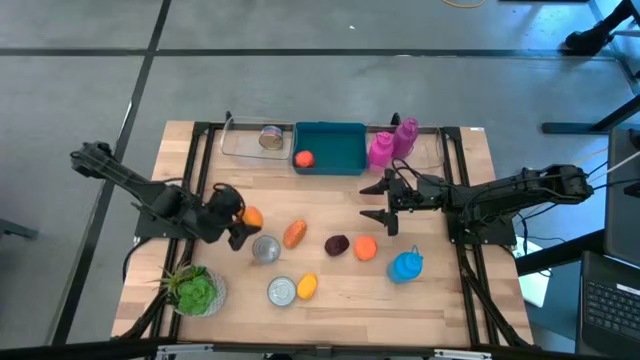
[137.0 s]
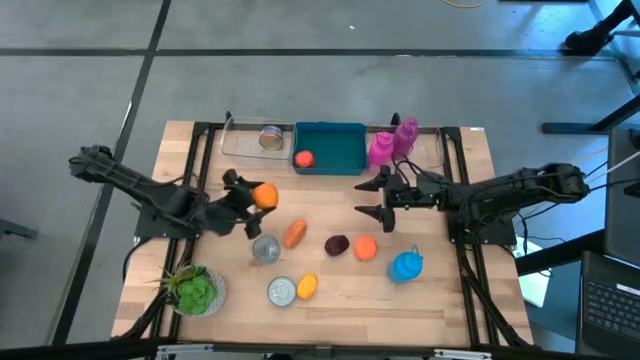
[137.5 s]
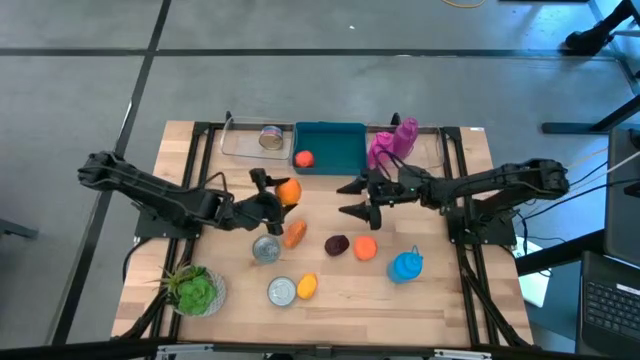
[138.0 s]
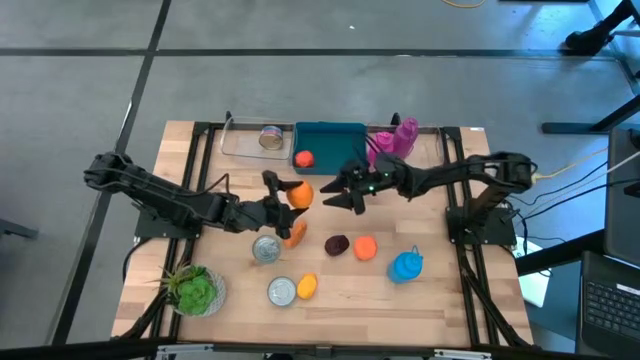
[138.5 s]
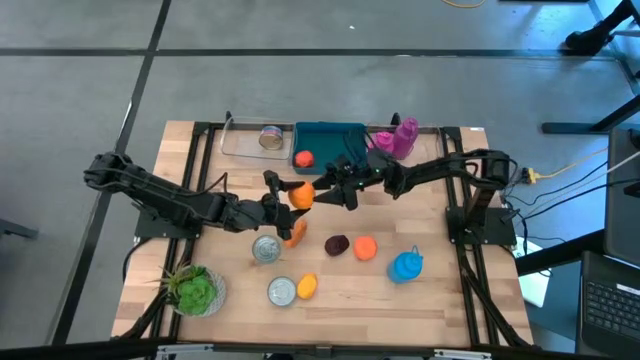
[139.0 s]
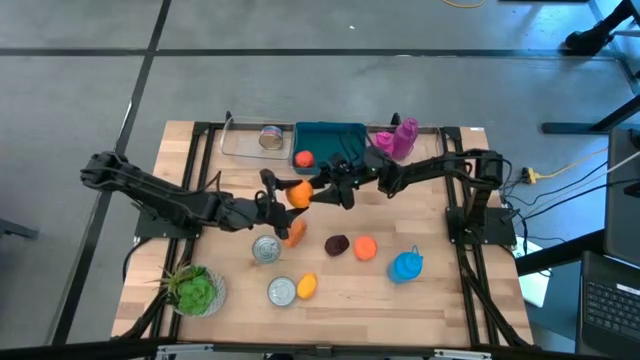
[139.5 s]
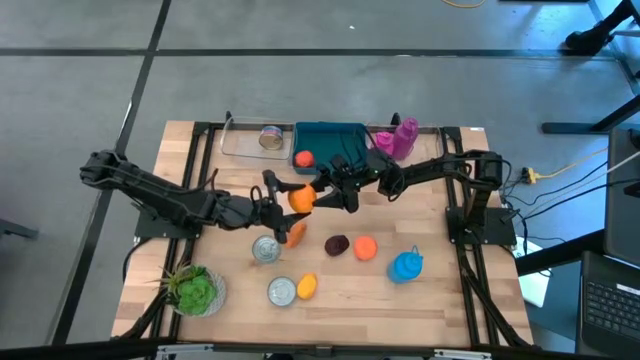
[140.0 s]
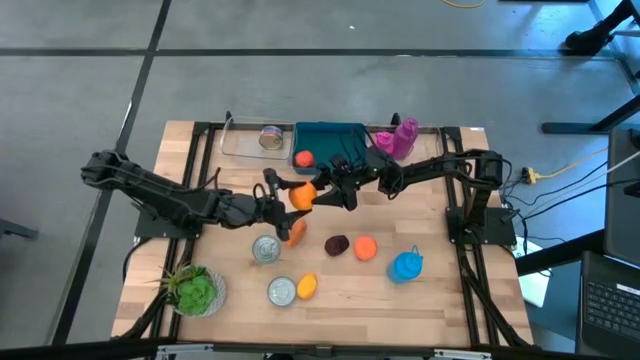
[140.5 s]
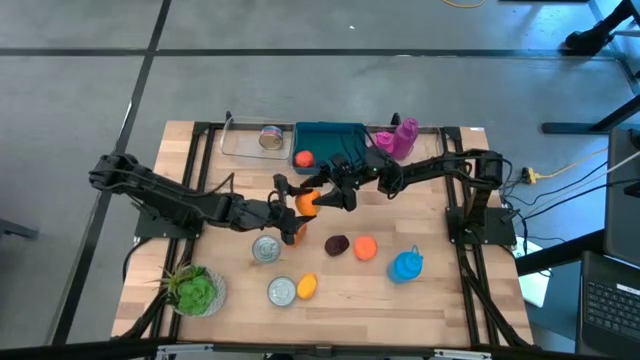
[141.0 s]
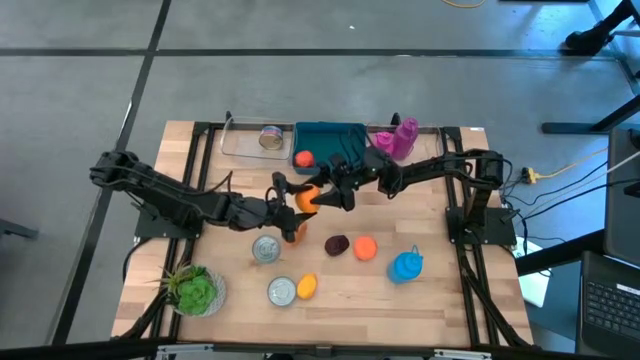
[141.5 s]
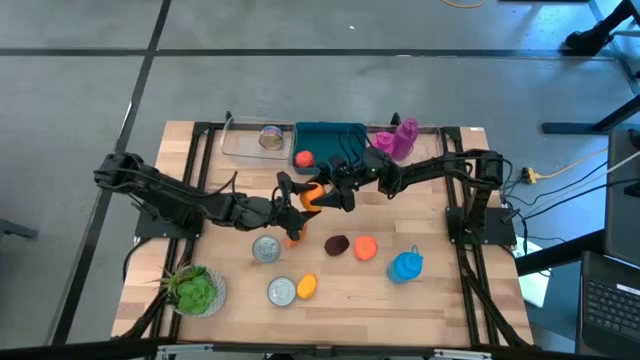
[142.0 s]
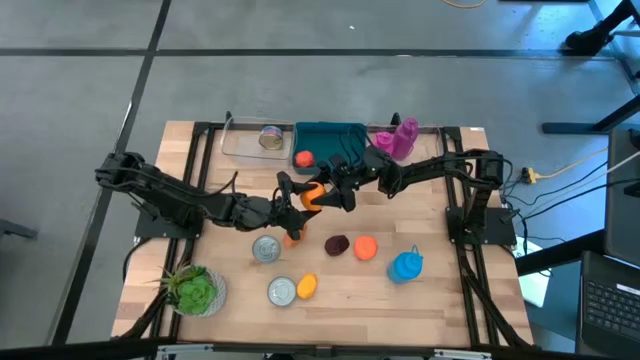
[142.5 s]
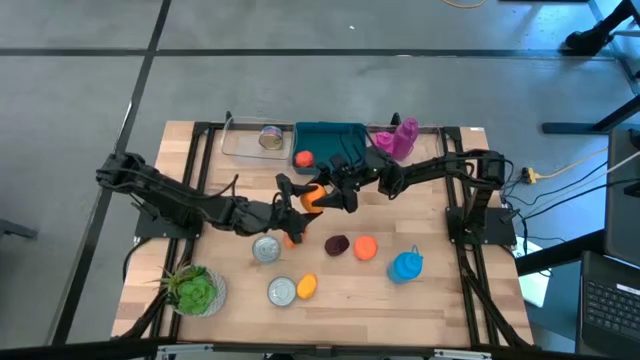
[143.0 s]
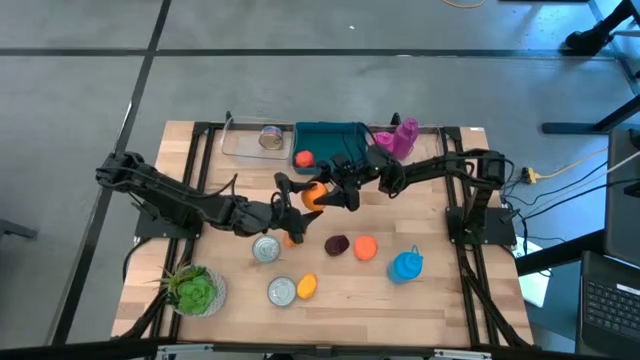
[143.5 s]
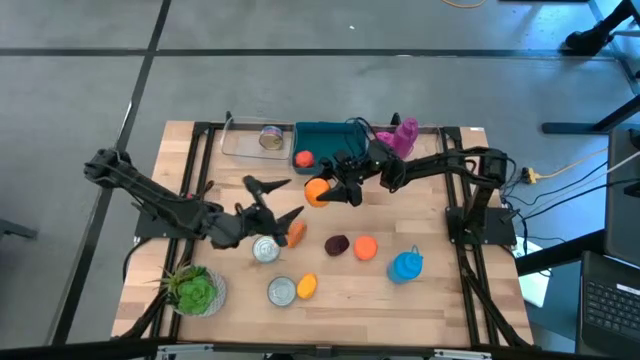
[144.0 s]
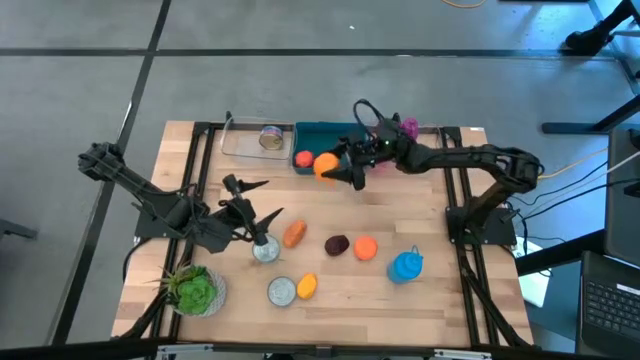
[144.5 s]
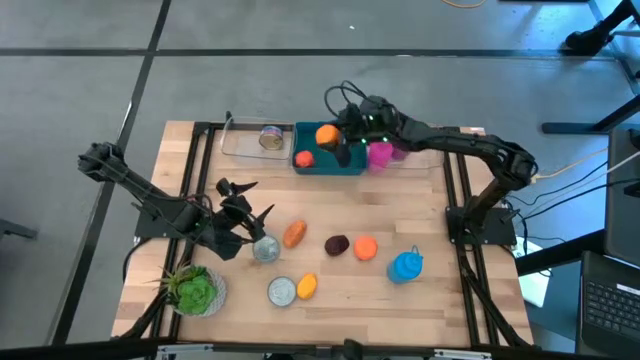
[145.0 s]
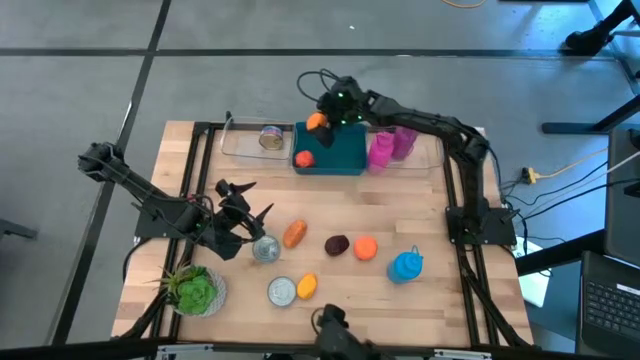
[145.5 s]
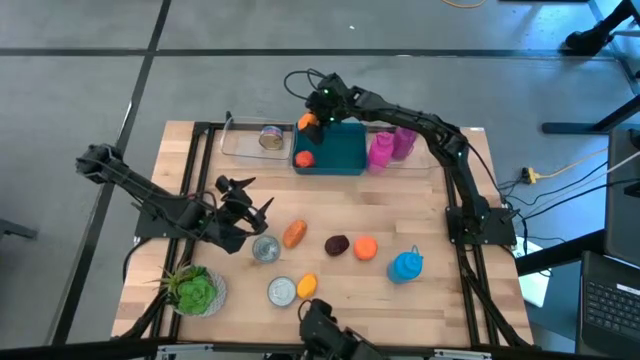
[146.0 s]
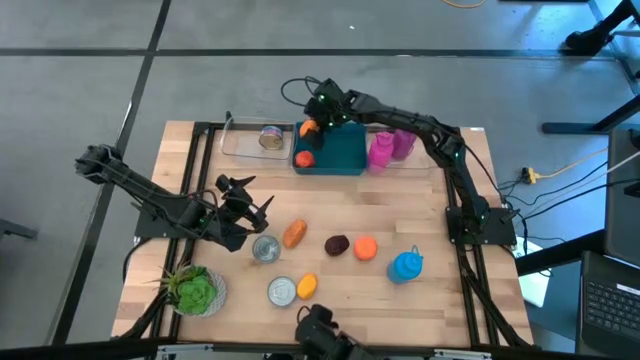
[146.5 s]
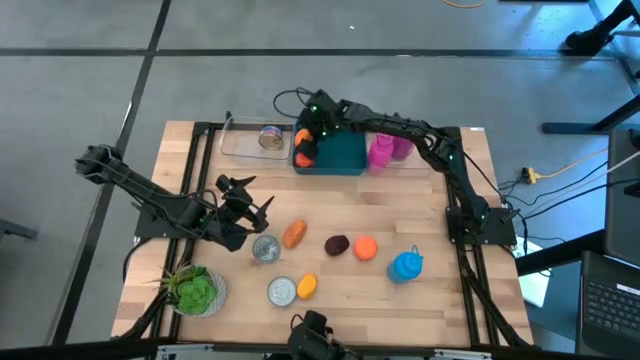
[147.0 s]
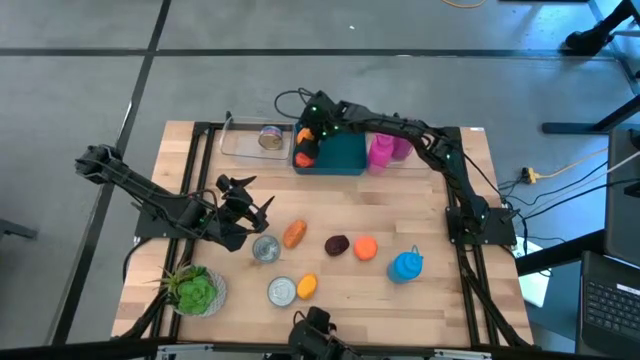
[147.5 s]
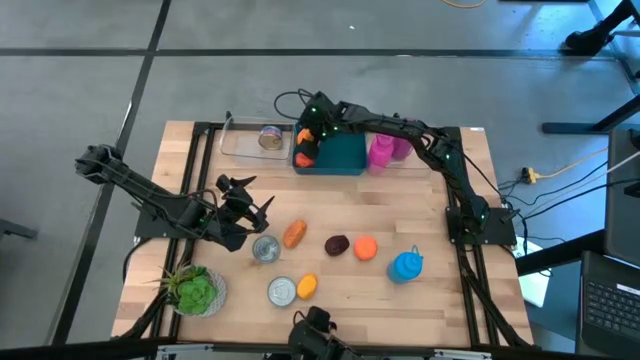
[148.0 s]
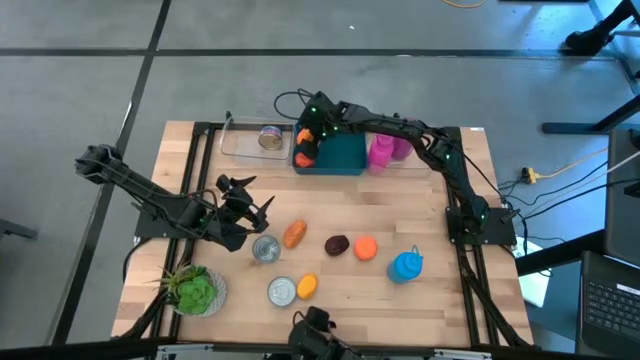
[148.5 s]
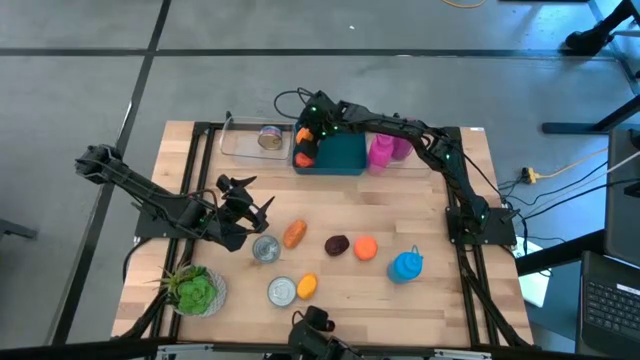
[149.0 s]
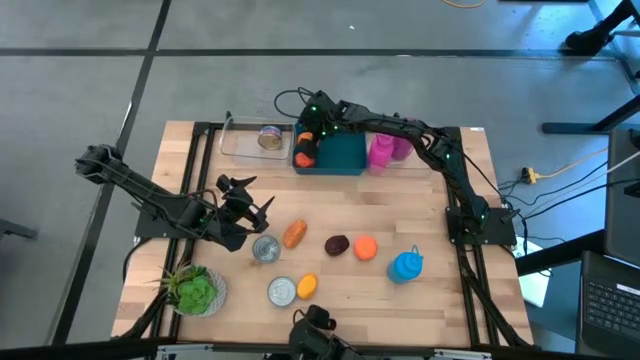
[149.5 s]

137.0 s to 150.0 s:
Task: Pick & Place Food Item
Put the left orange into the blue bin

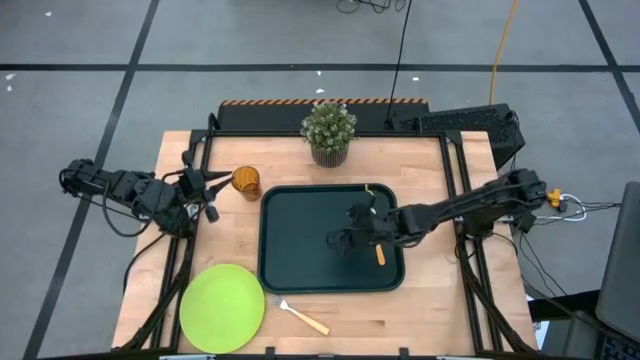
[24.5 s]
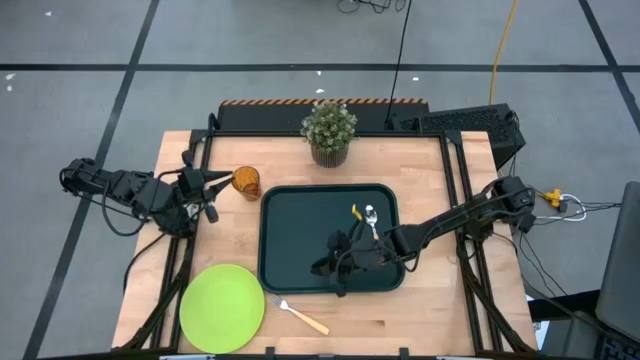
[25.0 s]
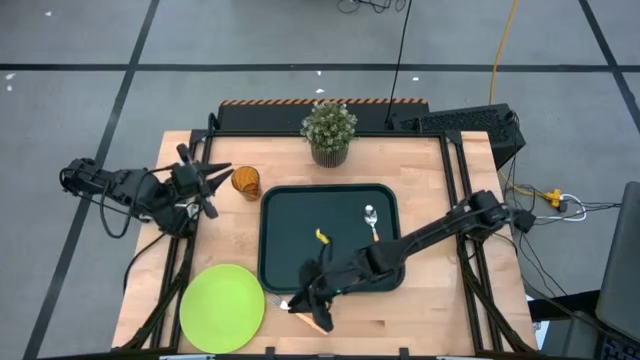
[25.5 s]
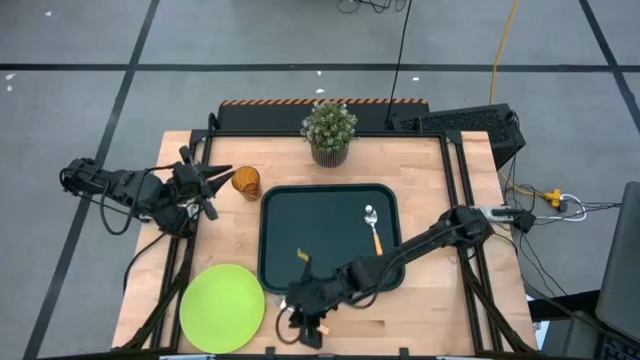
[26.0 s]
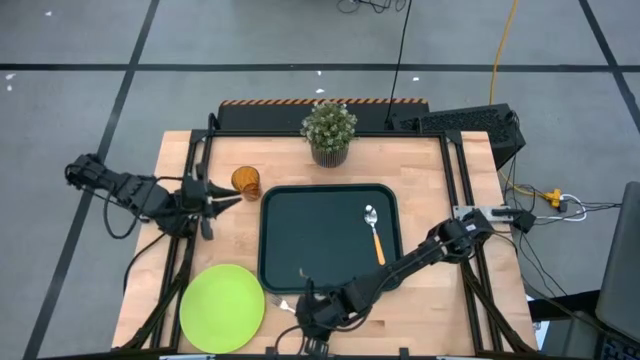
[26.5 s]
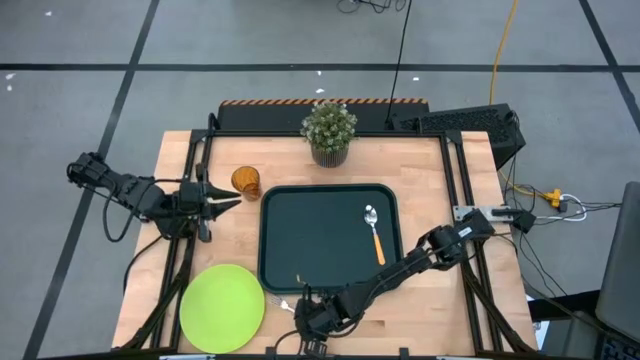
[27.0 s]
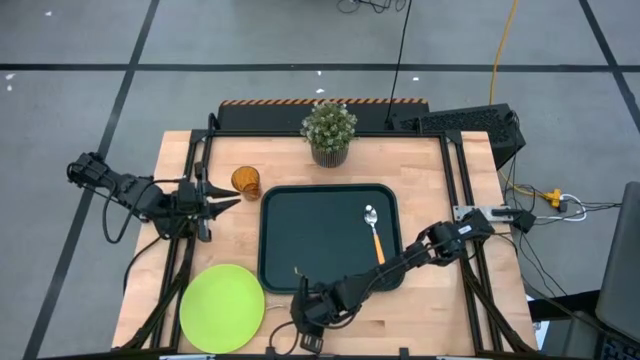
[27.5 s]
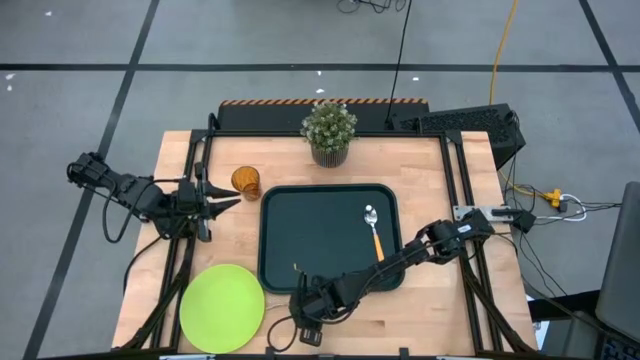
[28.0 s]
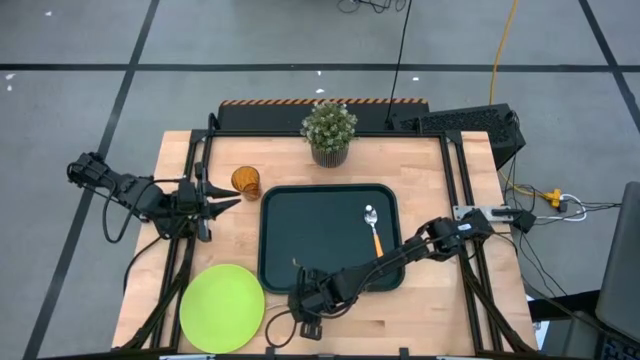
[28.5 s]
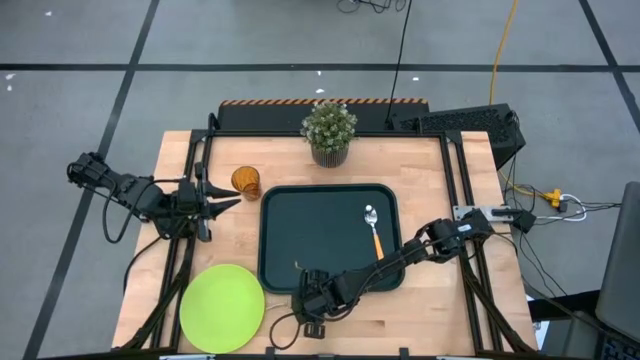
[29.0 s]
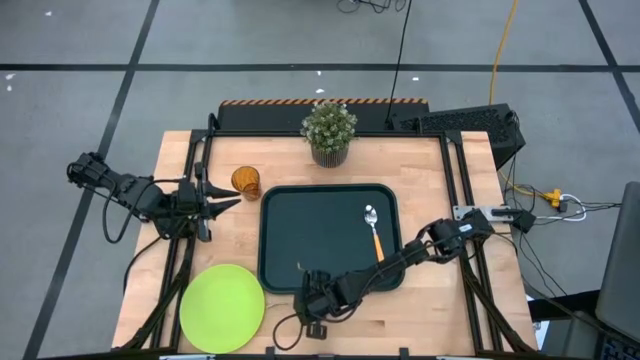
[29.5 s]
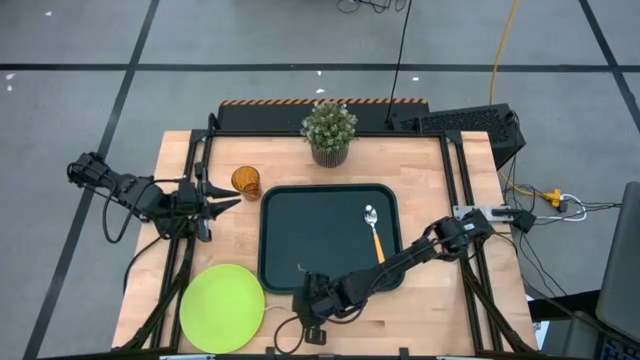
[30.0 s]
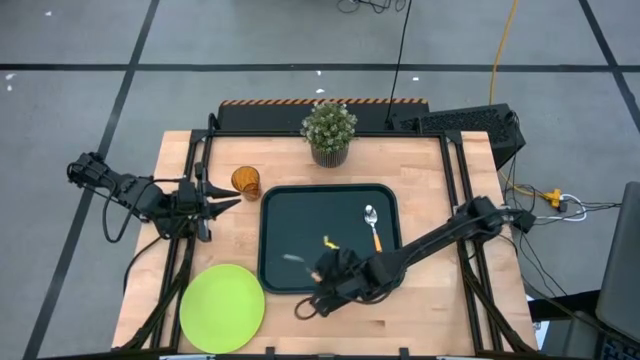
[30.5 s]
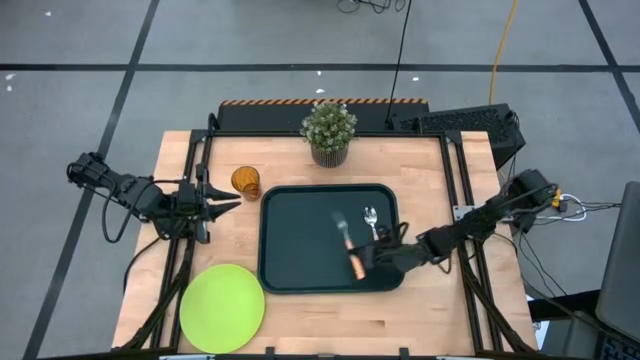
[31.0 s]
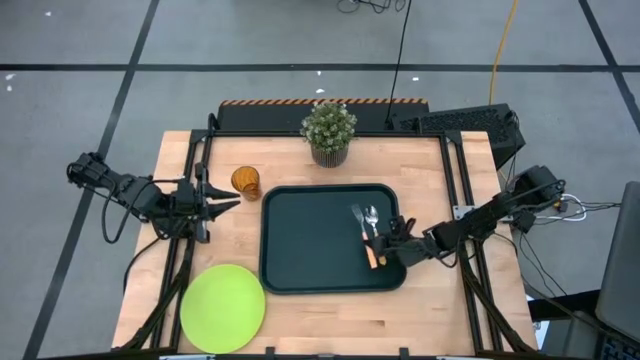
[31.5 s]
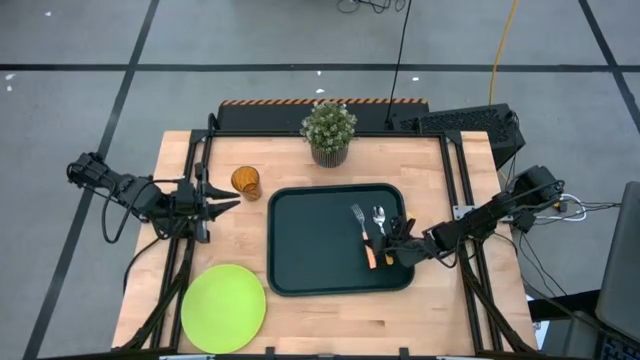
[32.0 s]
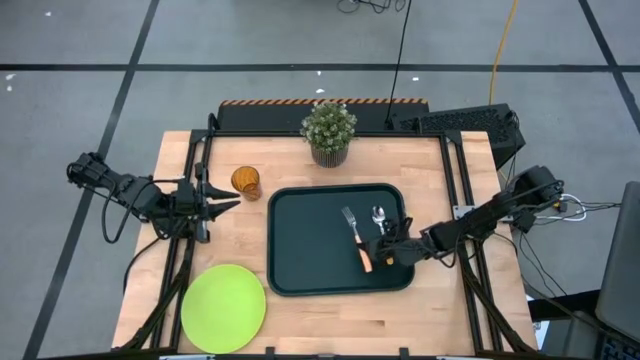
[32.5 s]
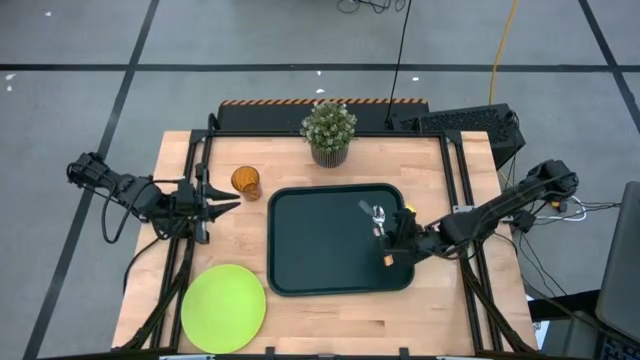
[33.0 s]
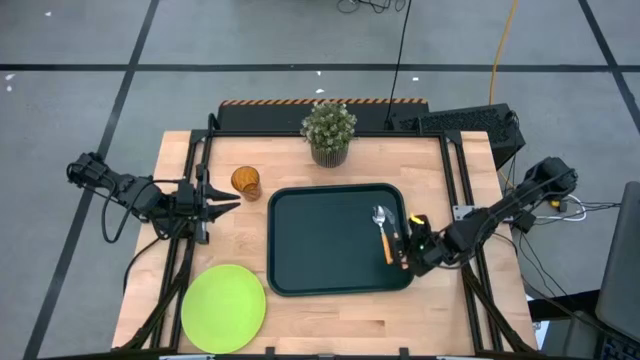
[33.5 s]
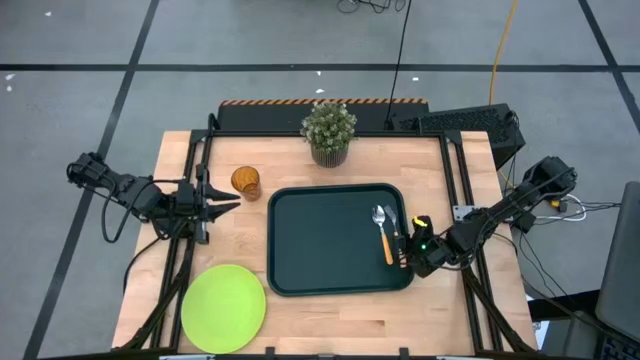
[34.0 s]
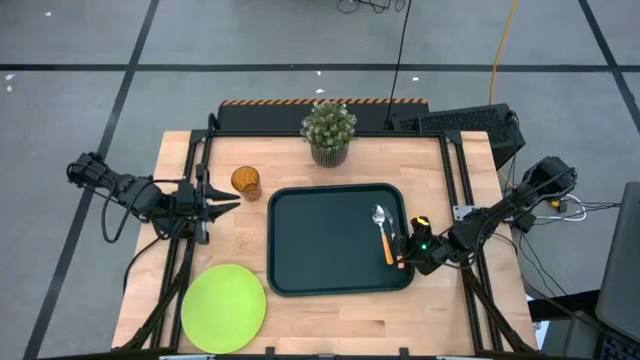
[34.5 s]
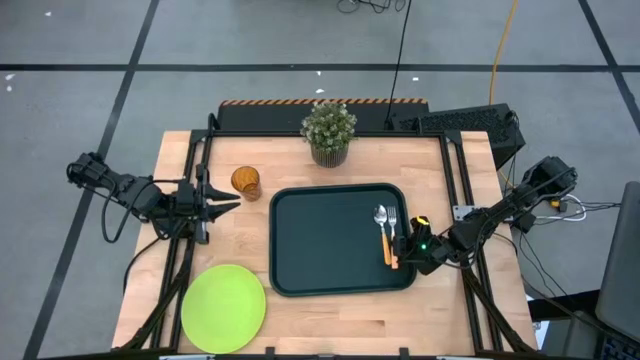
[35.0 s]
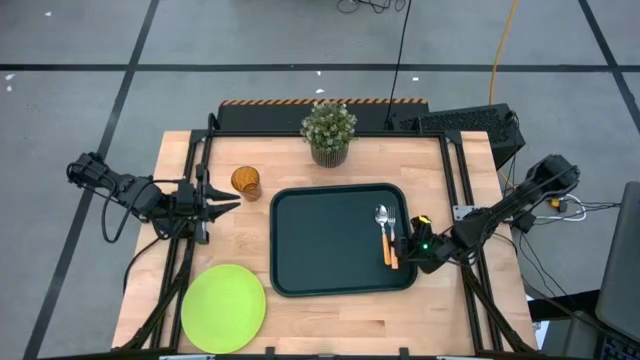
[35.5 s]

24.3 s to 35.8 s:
Task: Pick and place plate/cup/fork/spoon on tray
Put the fork on the right side of the spoon on the serving tray
